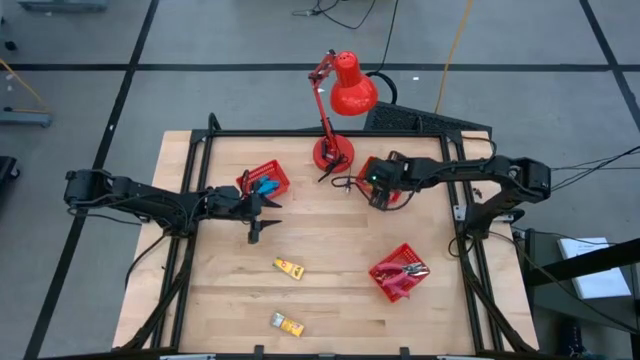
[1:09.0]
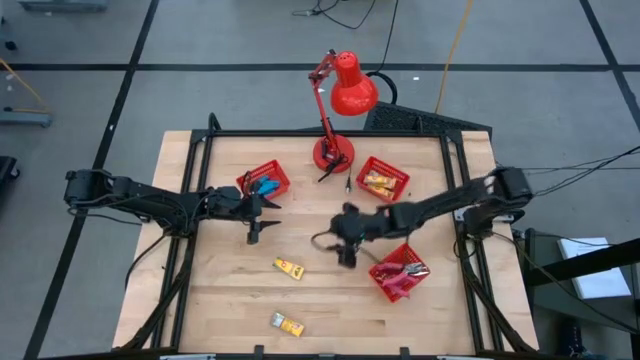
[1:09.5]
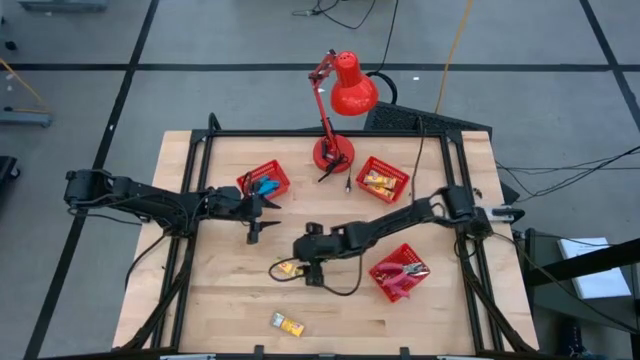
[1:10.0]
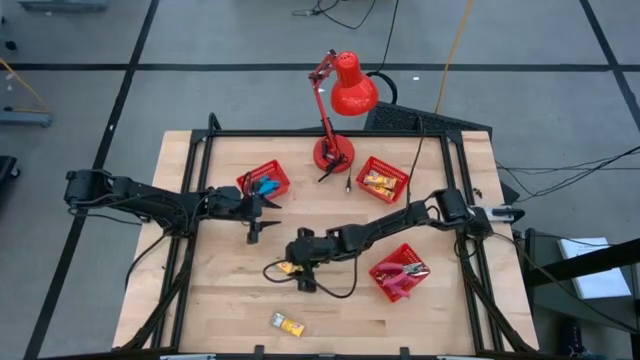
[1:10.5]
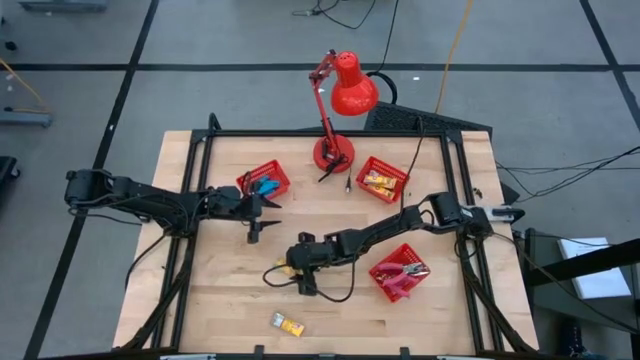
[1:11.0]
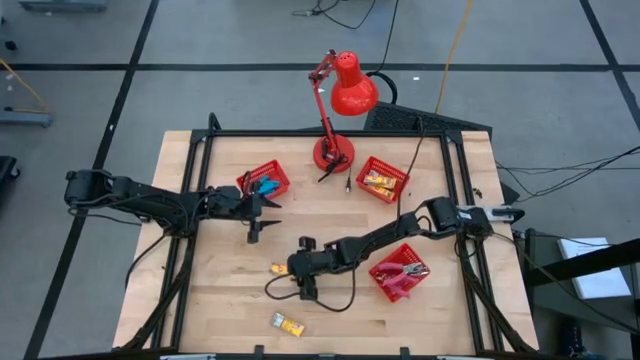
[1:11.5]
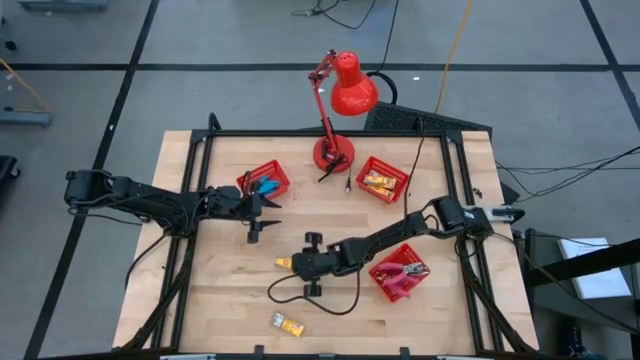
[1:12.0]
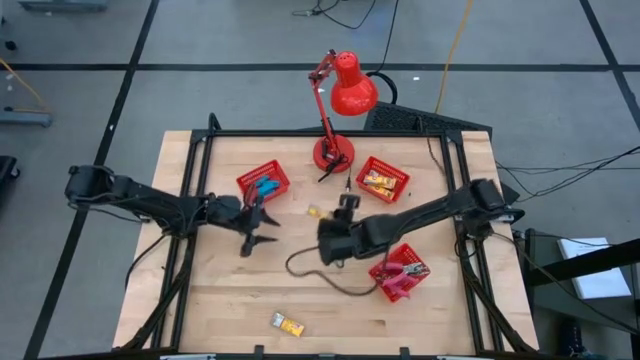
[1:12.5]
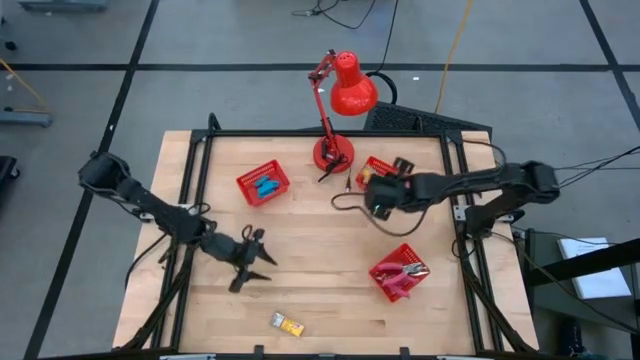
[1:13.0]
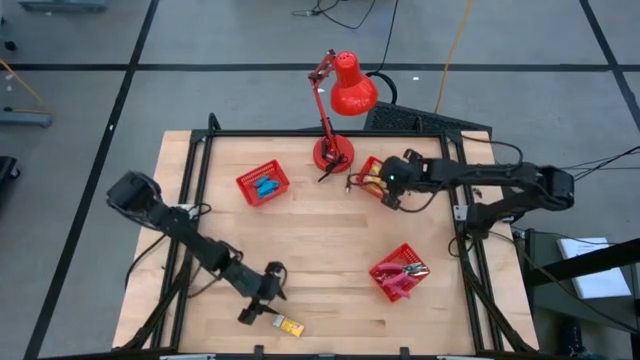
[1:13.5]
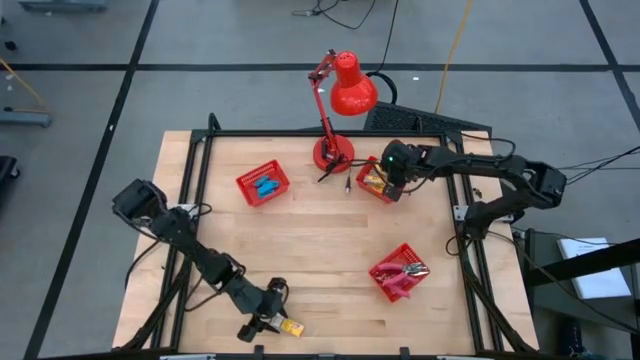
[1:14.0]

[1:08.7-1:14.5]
Task: Pick & Place School Supplies
Put the yellow crayon box into the top right red bin

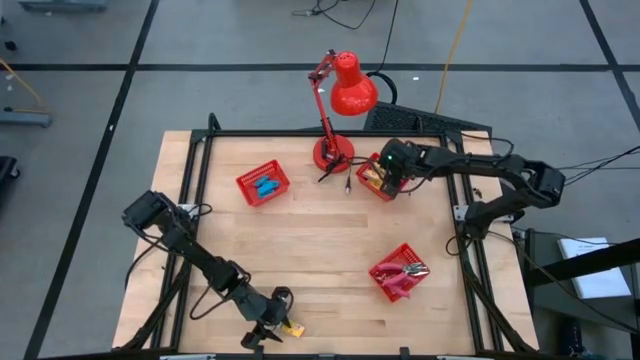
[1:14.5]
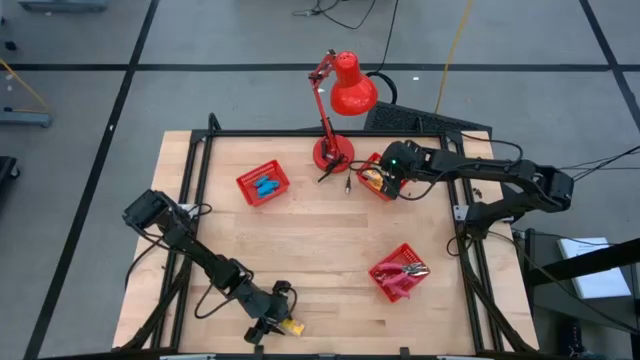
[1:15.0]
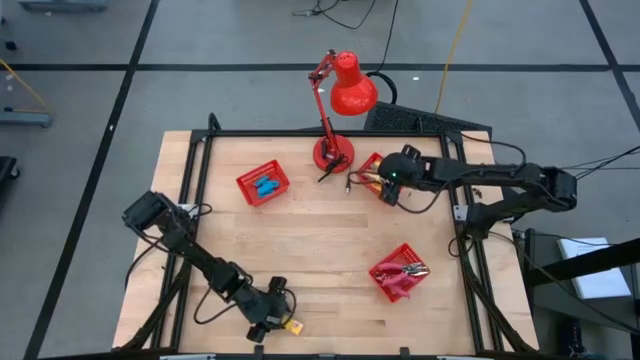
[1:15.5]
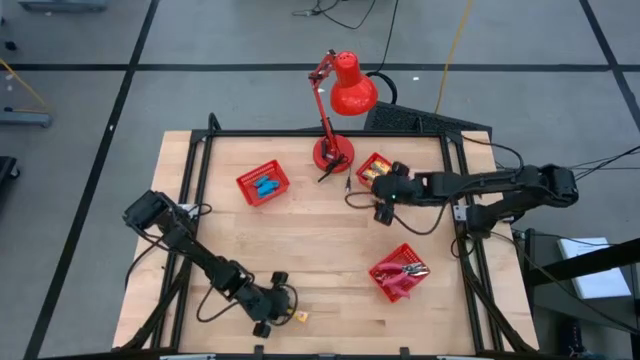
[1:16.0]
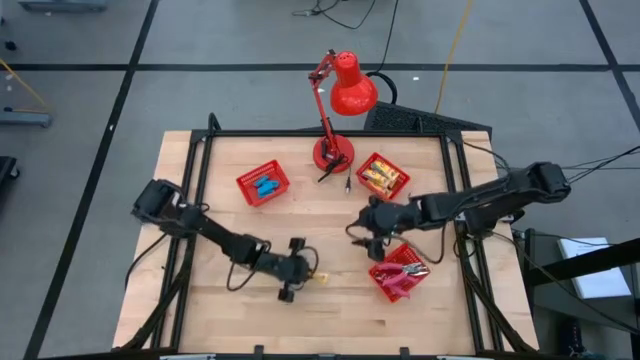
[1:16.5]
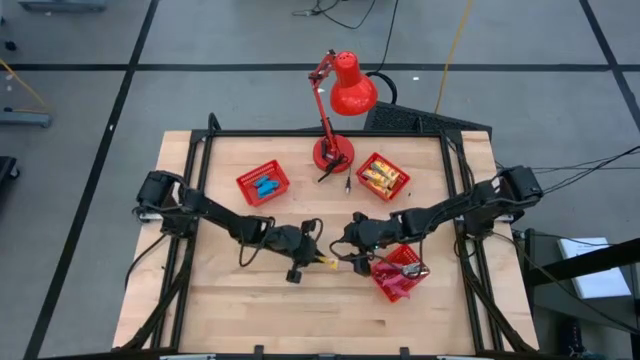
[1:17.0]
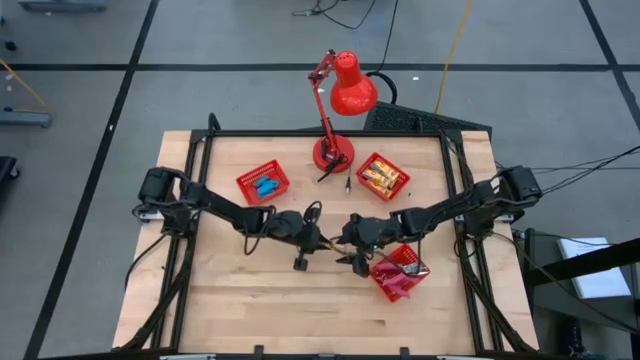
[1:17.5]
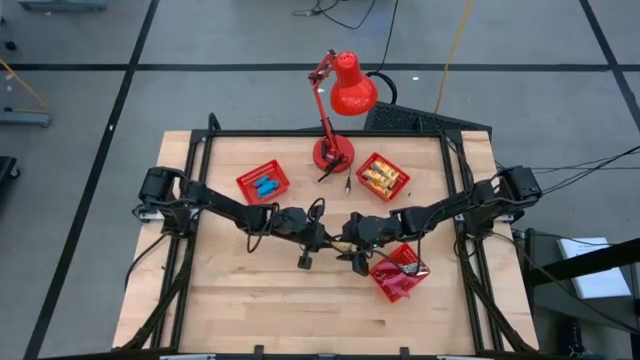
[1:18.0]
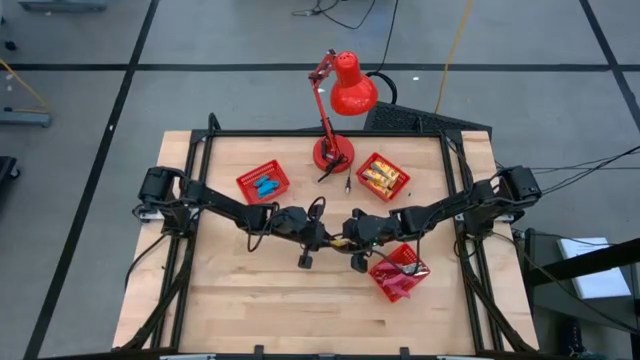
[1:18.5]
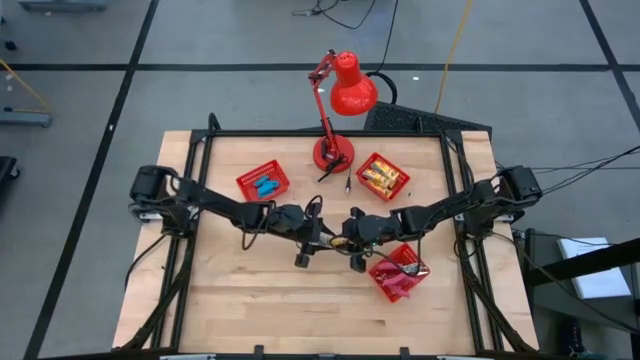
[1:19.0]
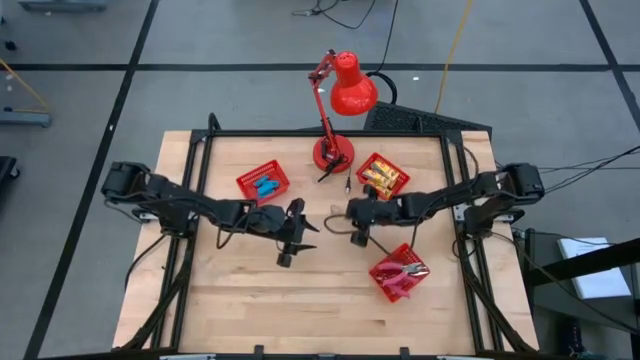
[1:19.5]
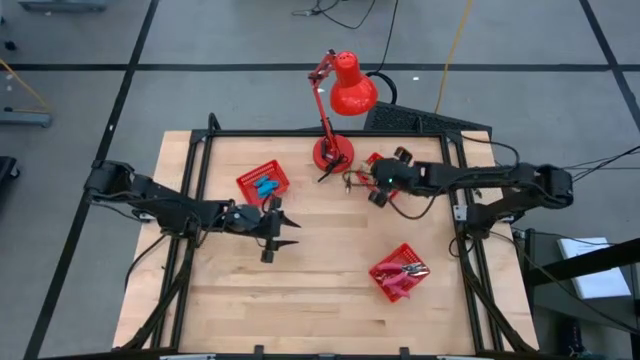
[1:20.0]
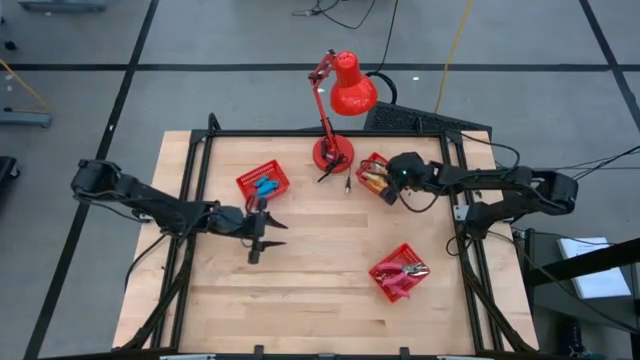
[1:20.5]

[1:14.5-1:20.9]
Put the yellow crayon box into the top right red bin

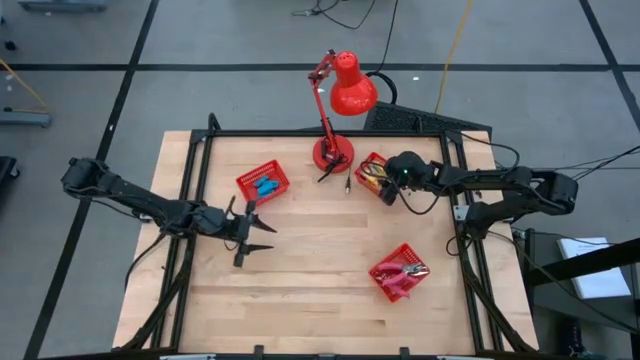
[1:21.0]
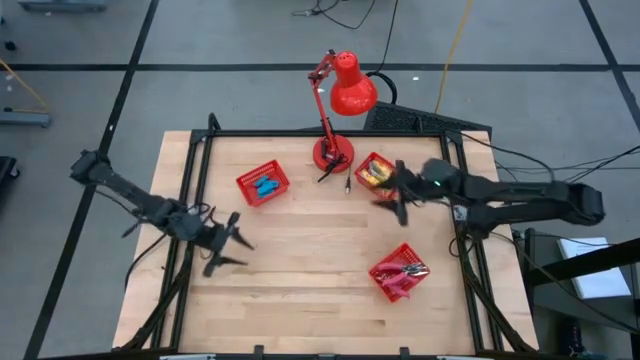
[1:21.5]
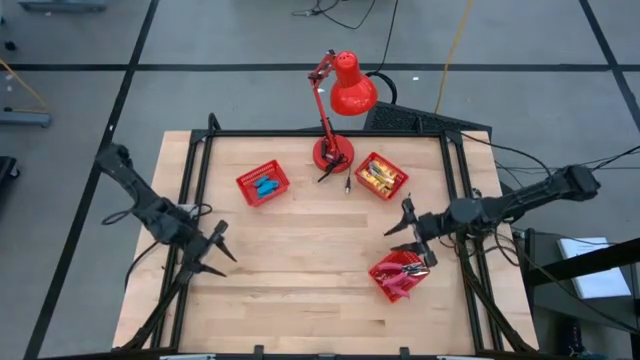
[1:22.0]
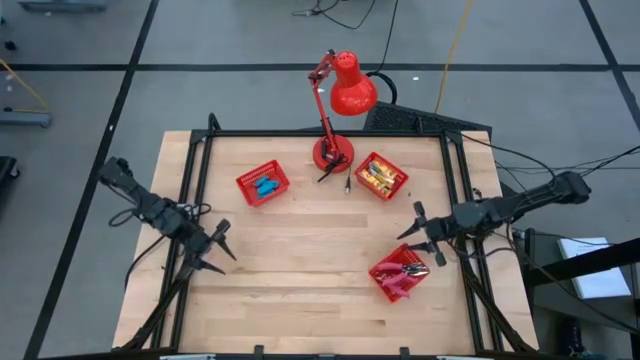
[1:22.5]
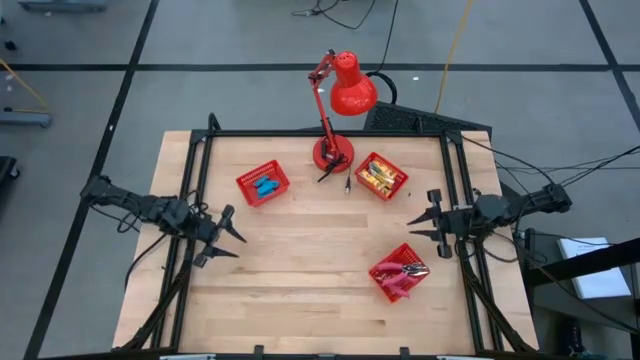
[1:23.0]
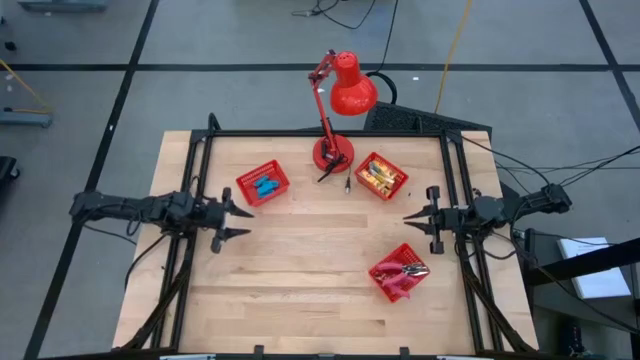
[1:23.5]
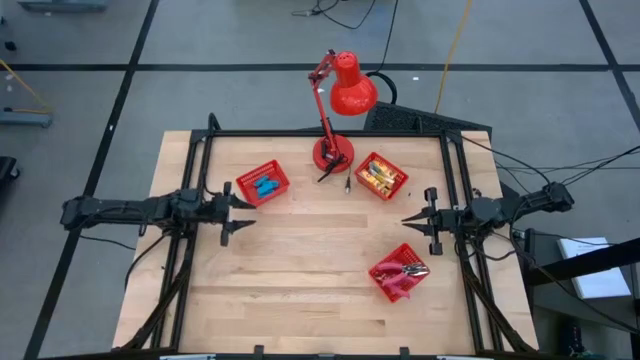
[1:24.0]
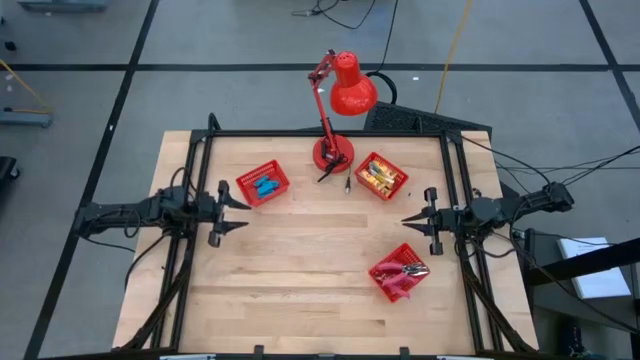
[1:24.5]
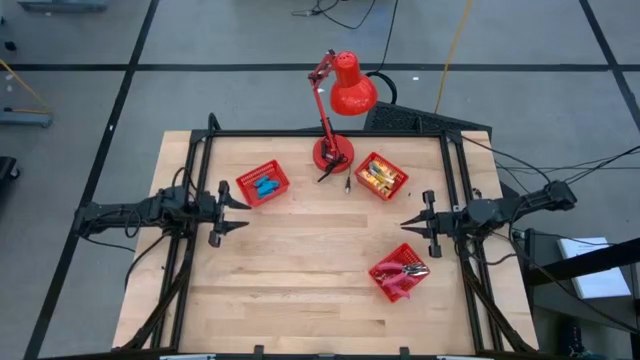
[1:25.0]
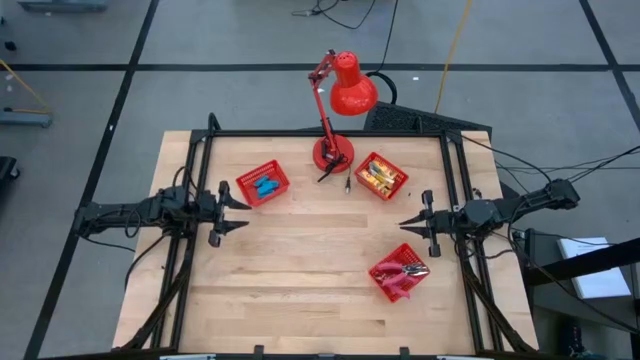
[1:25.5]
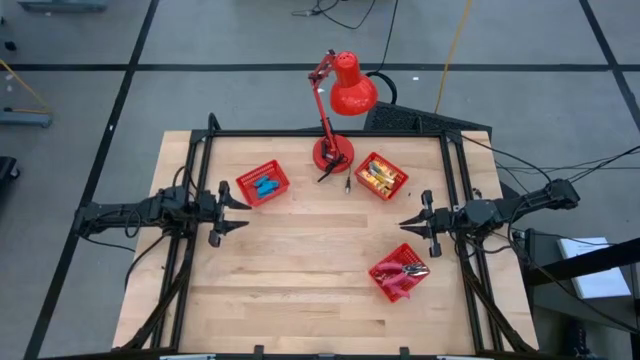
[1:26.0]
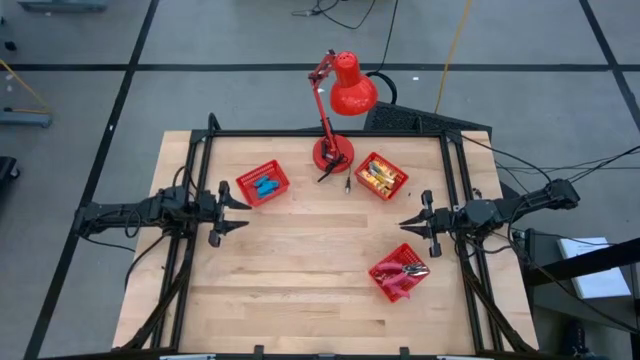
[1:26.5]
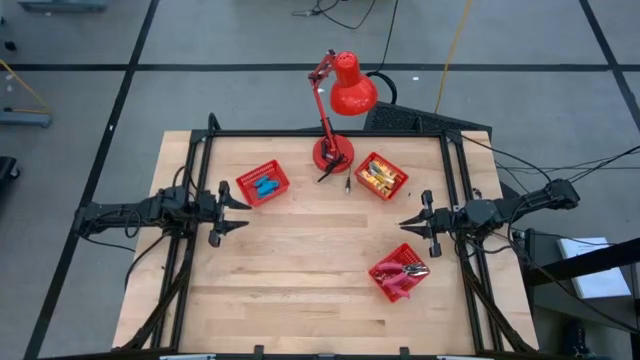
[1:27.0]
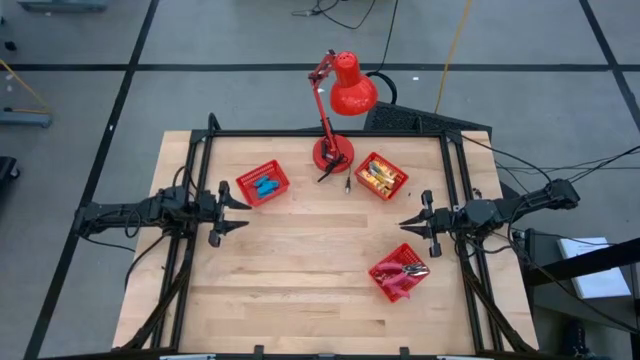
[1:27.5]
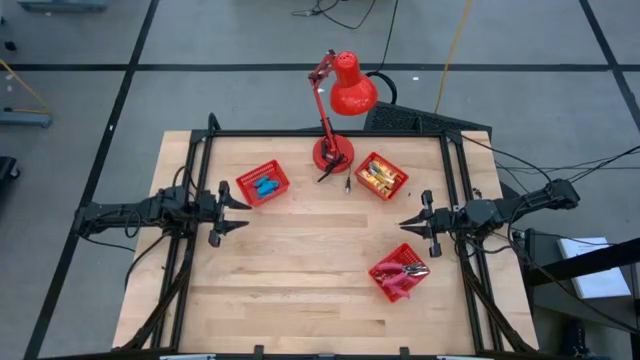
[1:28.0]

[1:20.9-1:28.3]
Return to Home Position

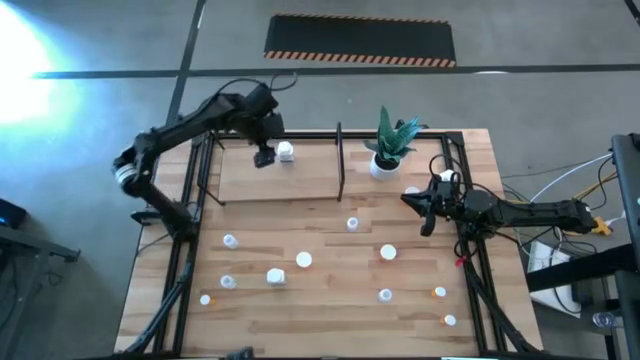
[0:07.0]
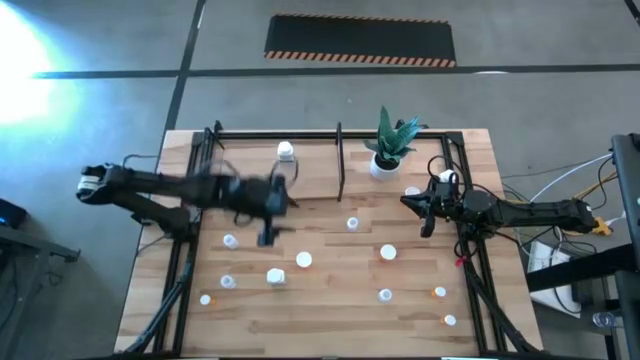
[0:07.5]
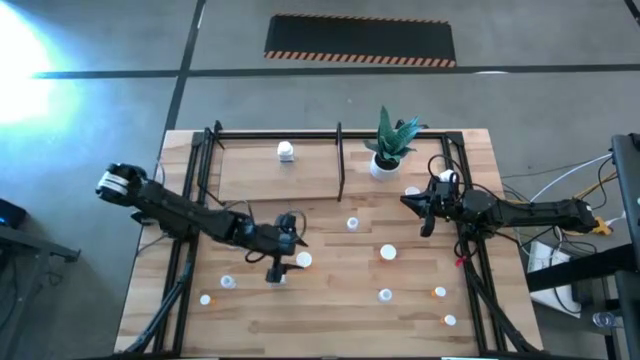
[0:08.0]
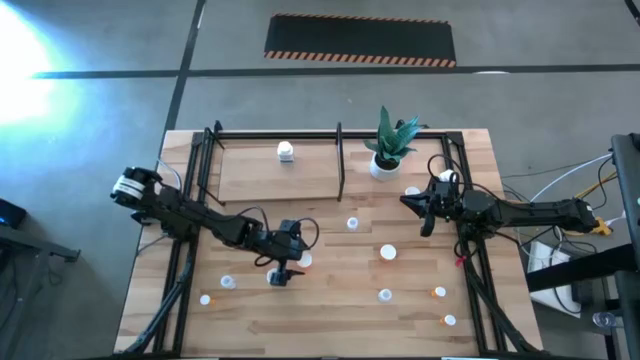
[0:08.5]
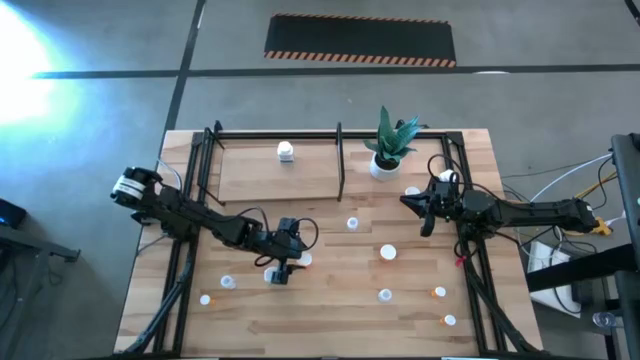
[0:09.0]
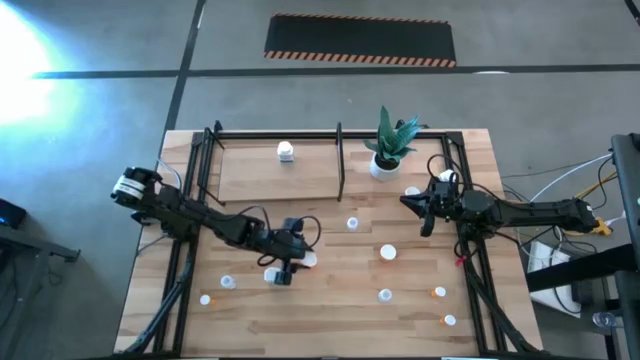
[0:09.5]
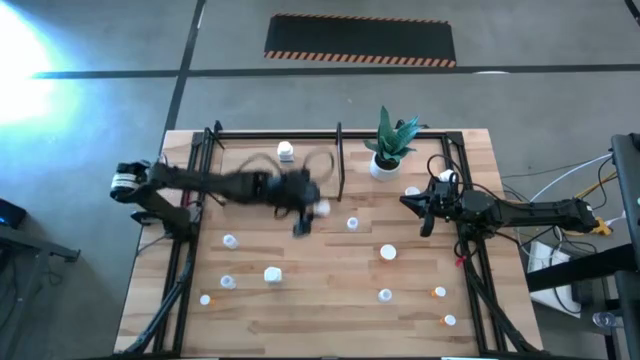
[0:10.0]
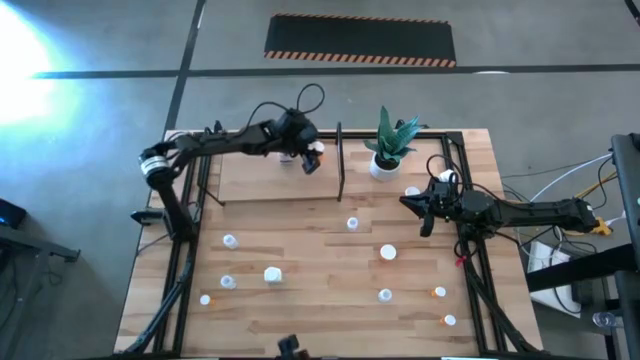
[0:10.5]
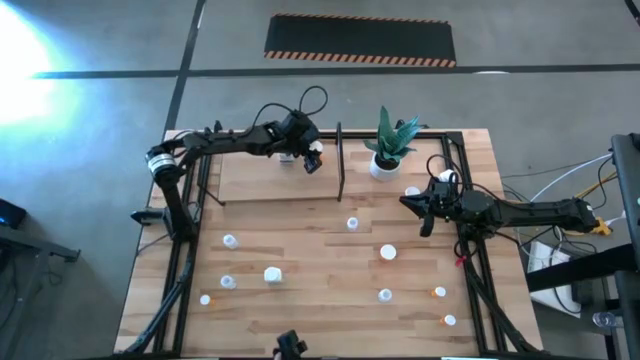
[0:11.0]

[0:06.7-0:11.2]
Task: Pick and place medicine bottles onto shelf by color
Put the orange medicine container on the shelf
